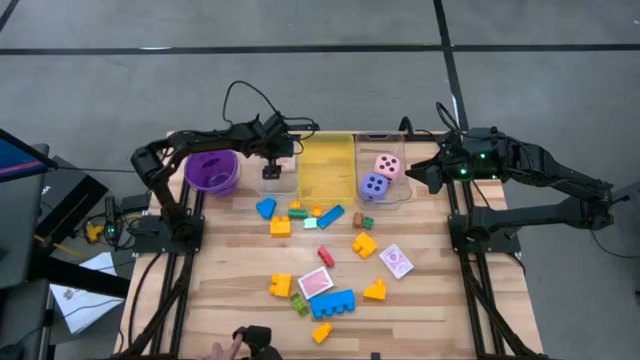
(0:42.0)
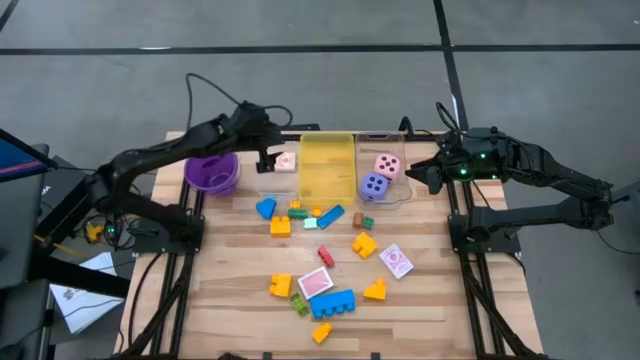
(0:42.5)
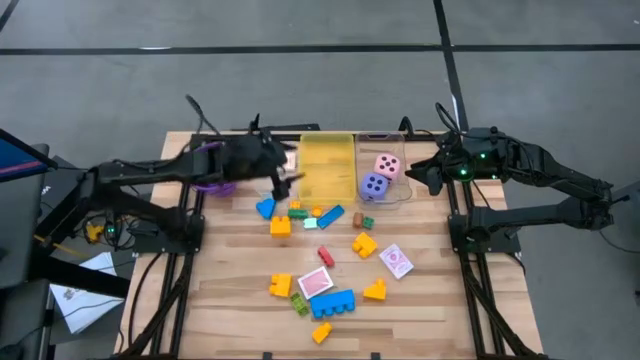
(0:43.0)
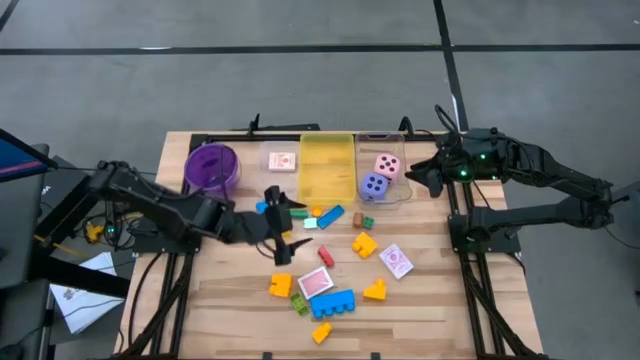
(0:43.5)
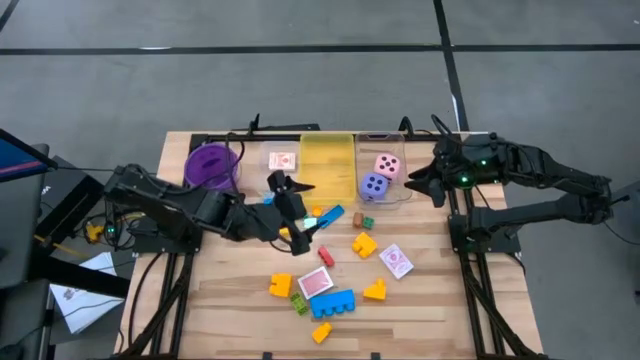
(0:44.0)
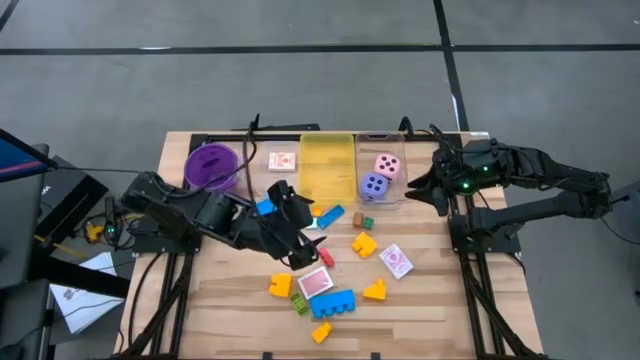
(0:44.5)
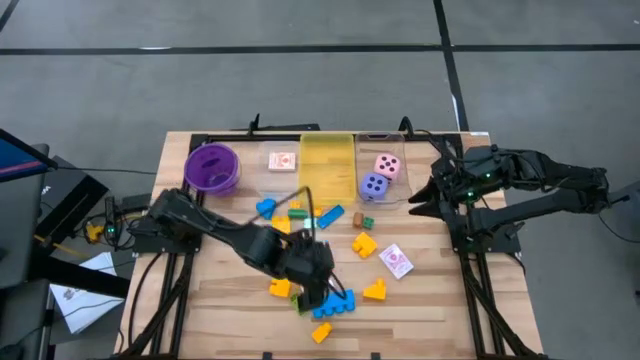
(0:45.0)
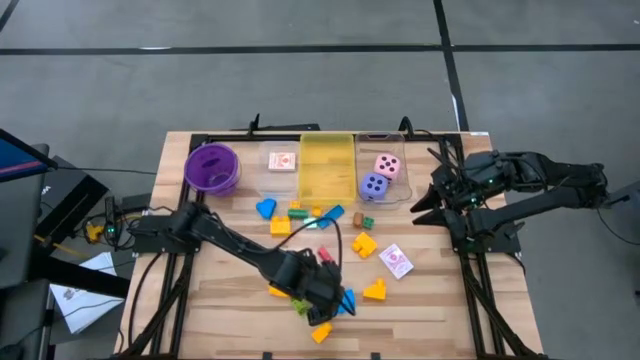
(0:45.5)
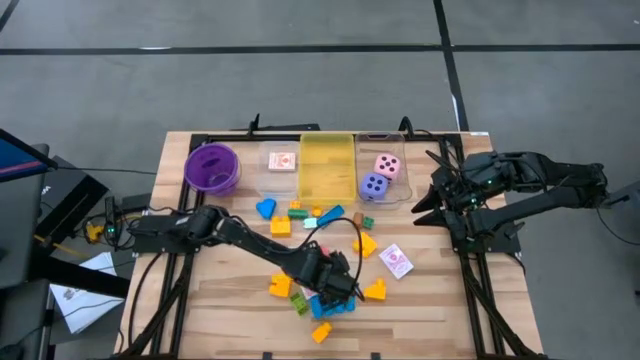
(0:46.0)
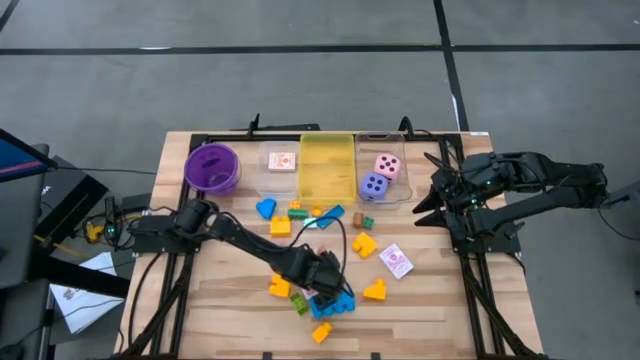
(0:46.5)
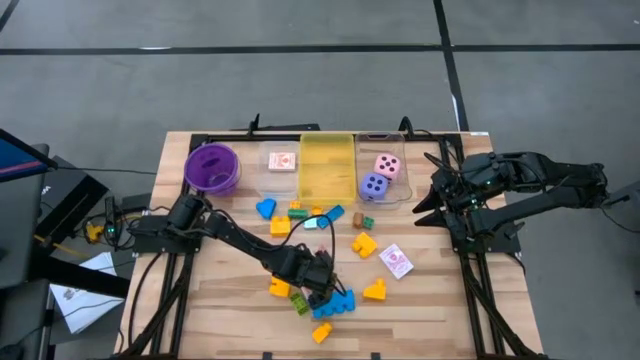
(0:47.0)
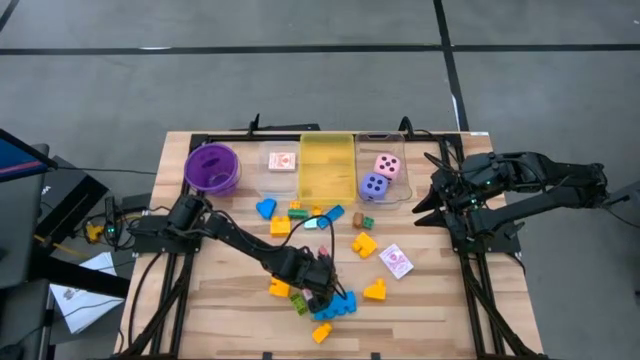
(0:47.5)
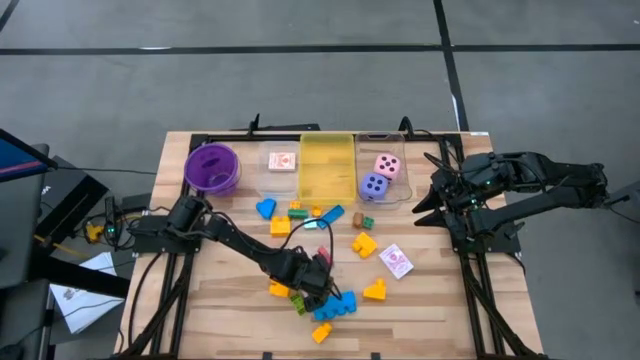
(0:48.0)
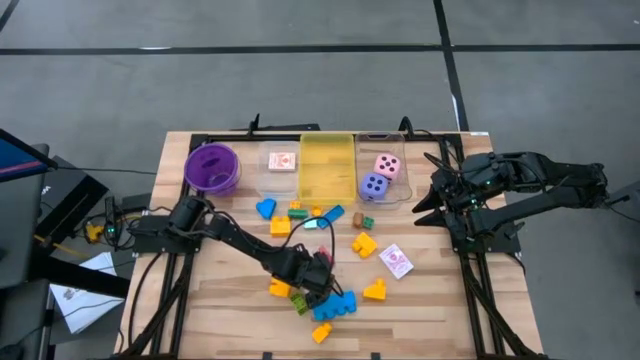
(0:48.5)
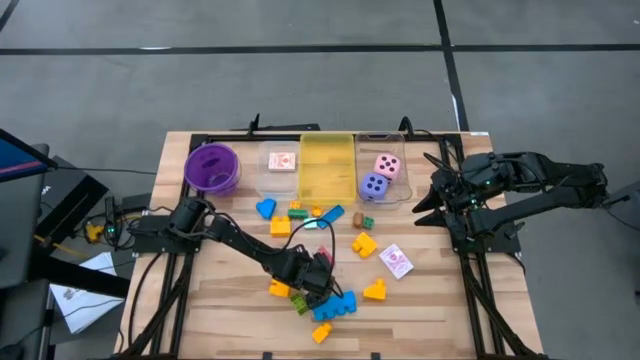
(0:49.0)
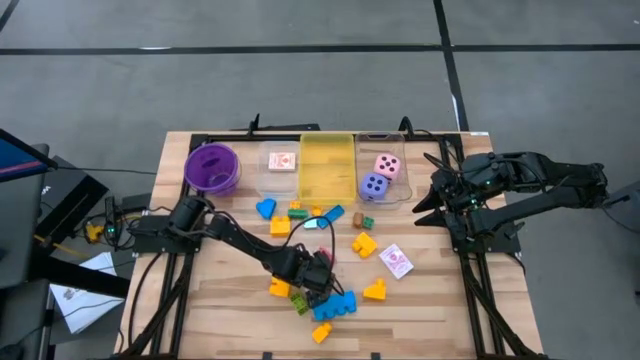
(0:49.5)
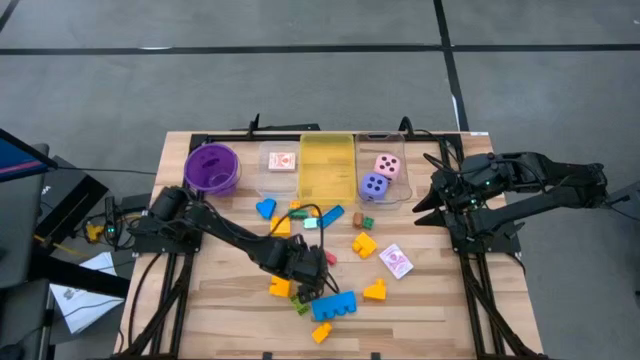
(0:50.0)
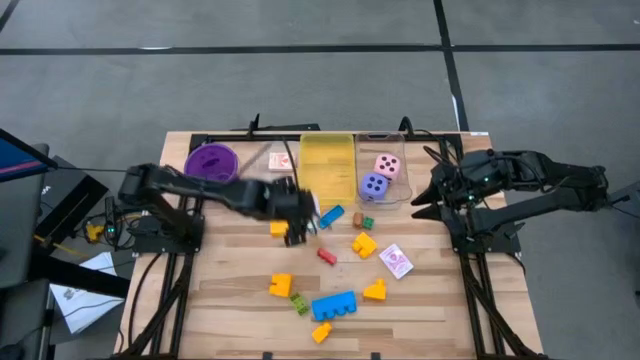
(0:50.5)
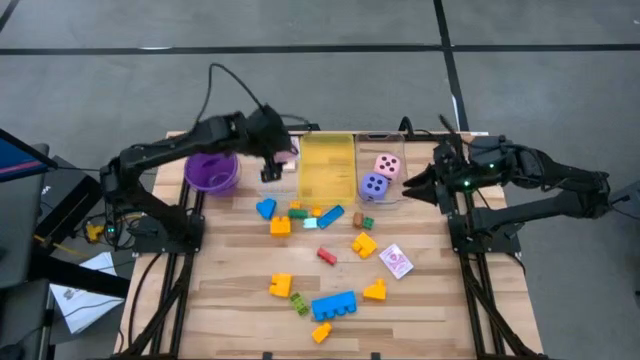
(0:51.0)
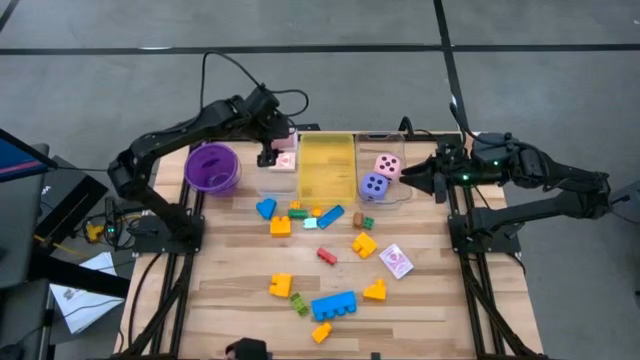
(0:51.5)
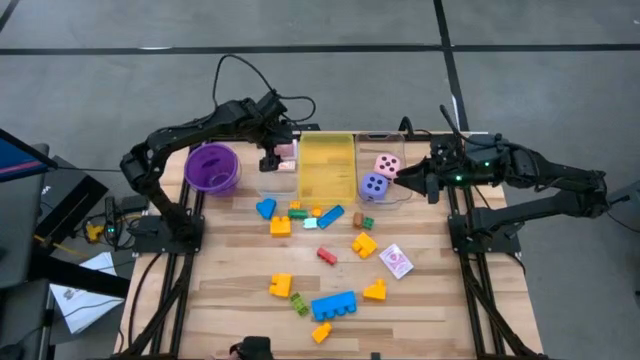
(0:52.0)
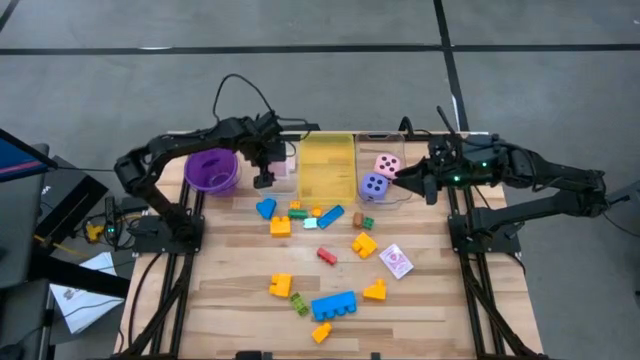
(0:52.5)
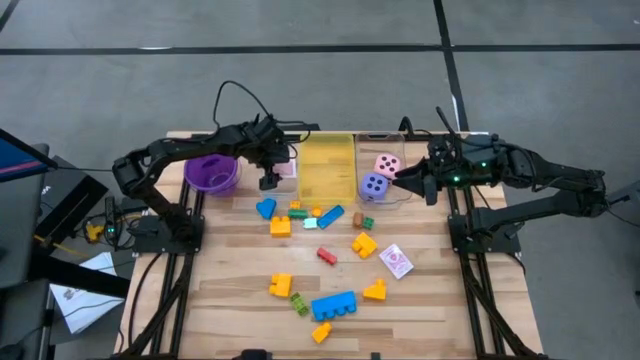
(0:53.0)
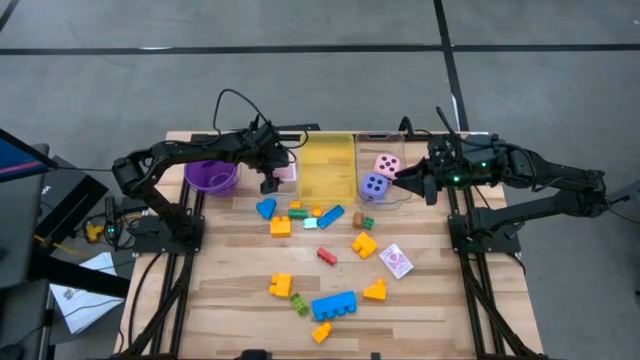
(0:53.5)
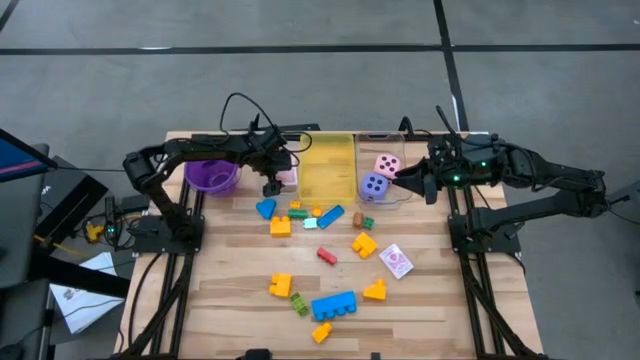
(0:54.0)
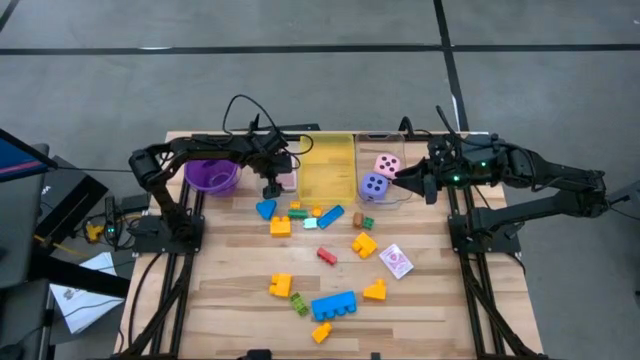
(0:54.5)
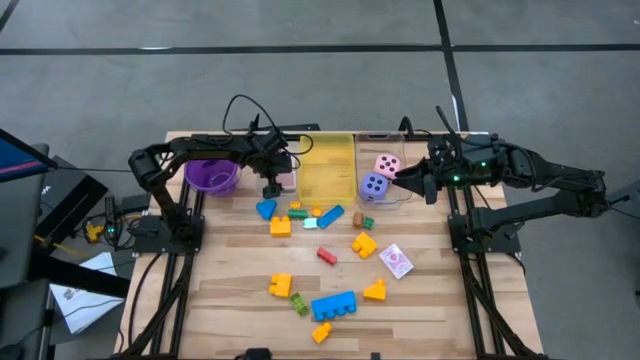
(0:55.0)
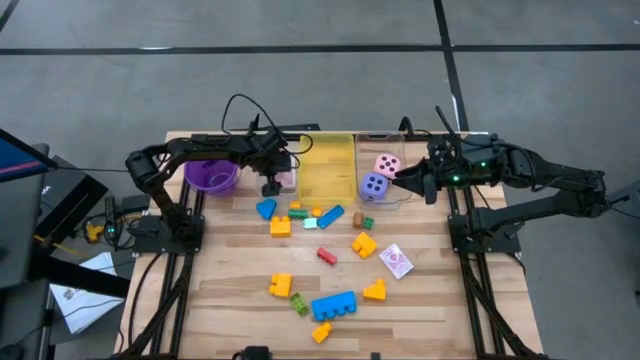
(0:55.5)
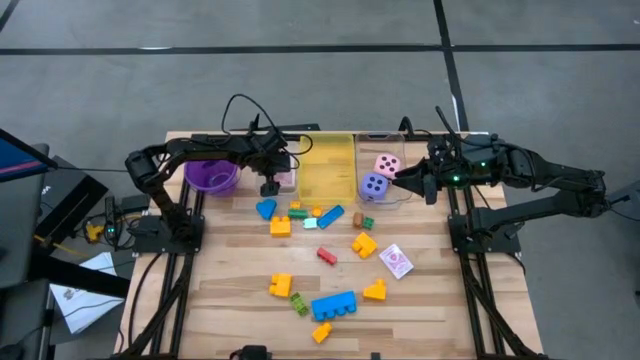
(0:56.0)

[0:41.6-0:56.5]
Task: Pick & Place Toys
Put the red deck of cards into the white bin

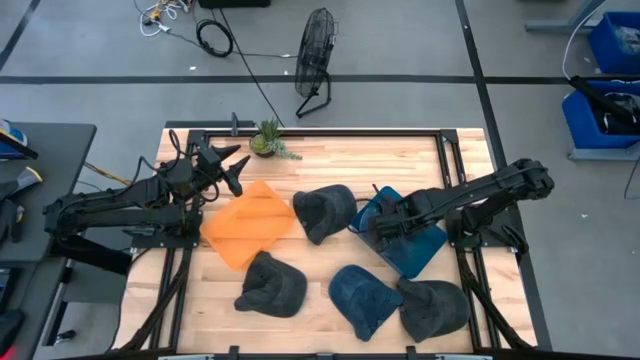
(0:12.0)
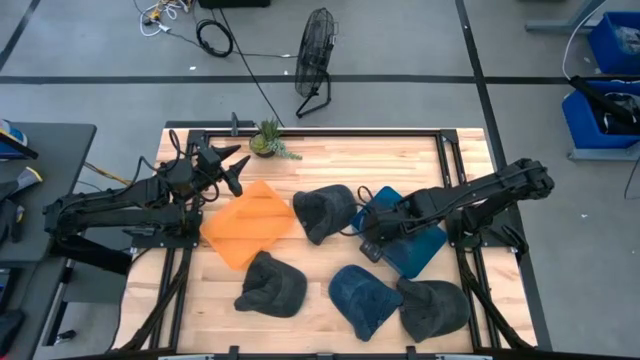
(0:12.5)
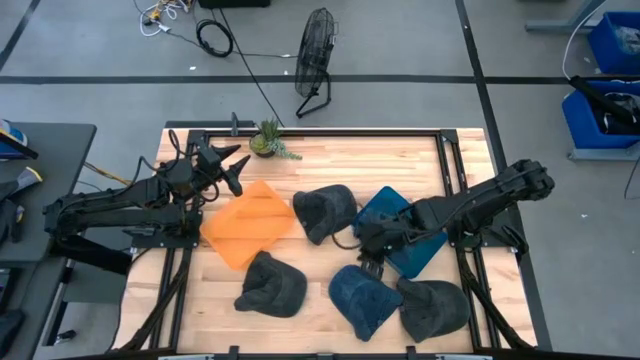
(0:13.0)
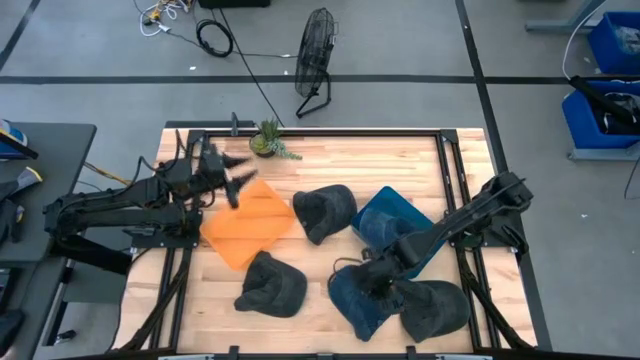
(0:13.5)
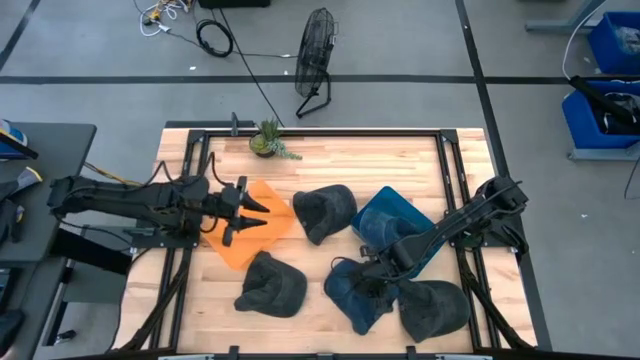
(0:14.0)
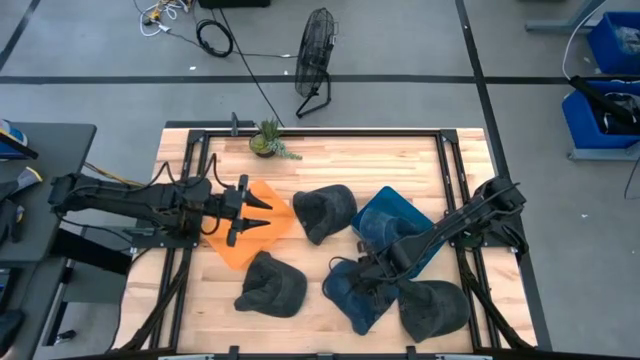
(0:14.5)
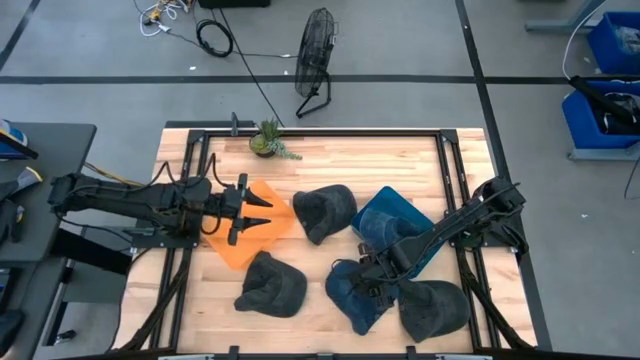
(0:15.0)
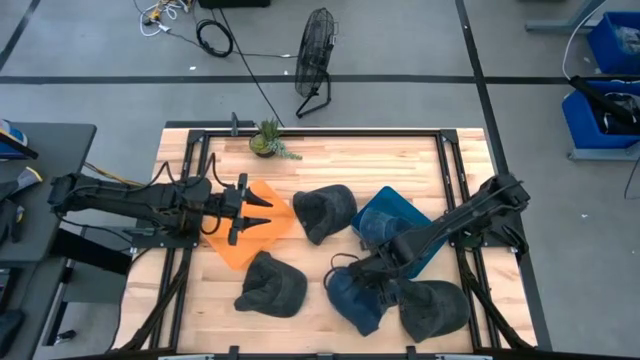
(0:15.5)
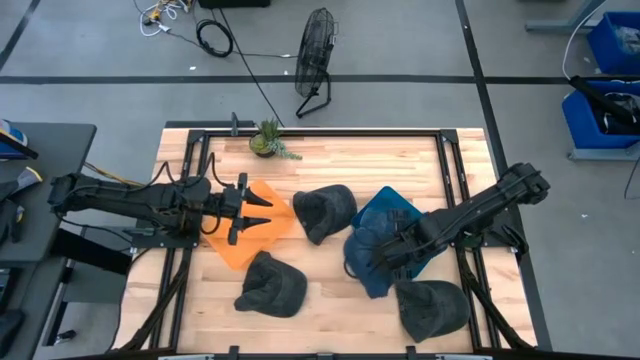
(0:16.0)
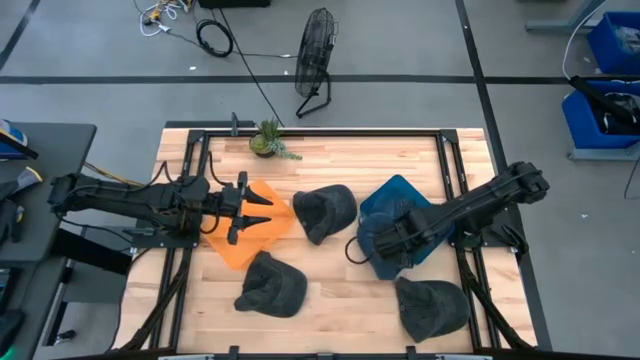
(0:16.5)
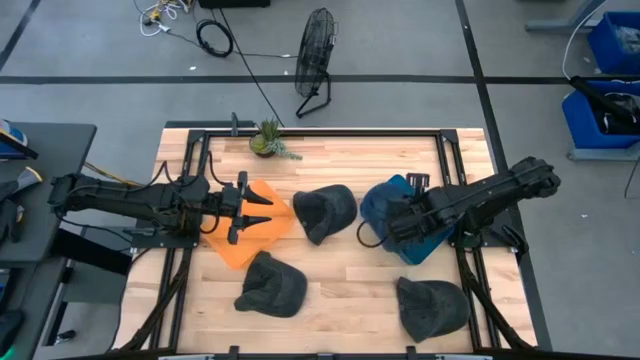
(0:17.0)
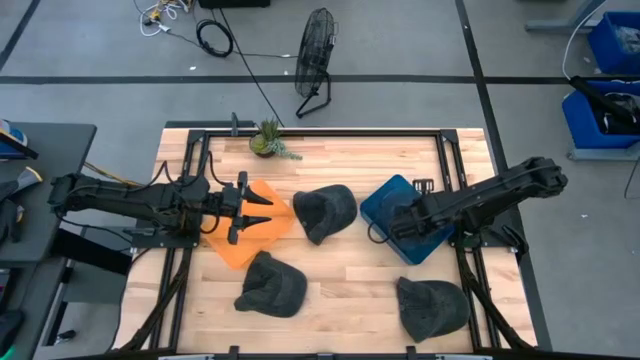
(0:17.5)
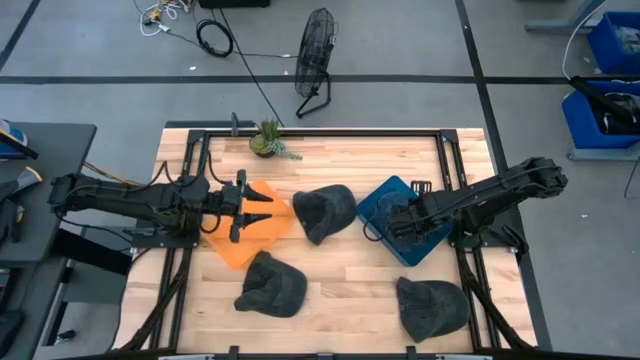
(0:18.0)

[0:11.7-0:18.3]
Task: Pick & Place hat
Put the blue cap into the blue bin
